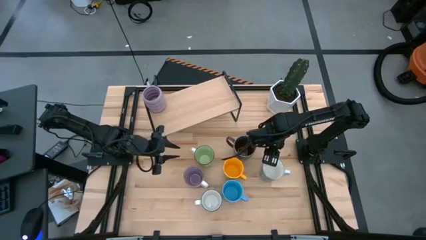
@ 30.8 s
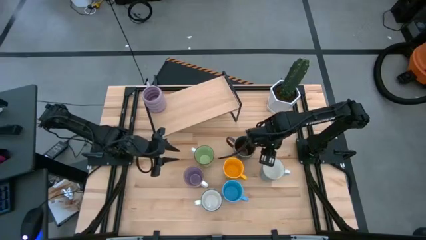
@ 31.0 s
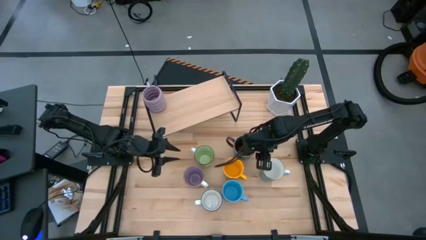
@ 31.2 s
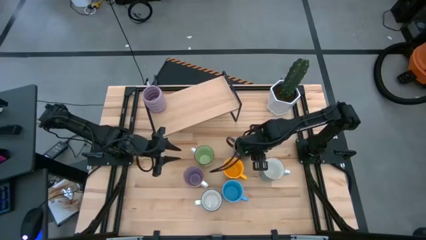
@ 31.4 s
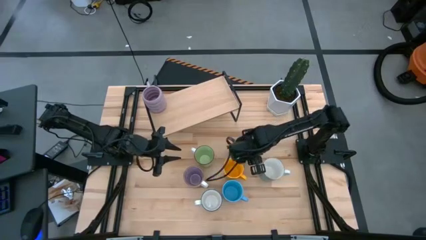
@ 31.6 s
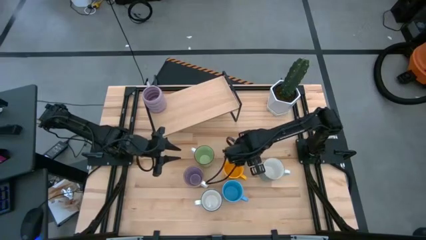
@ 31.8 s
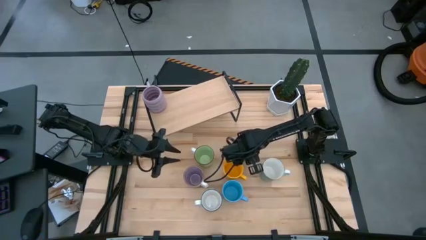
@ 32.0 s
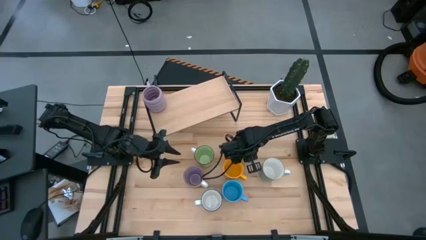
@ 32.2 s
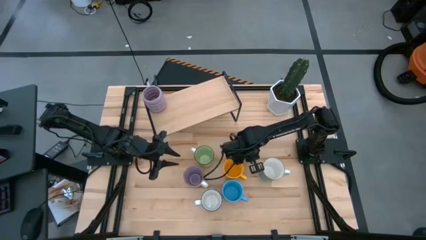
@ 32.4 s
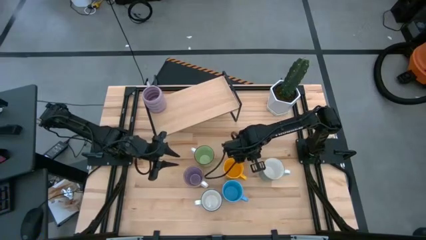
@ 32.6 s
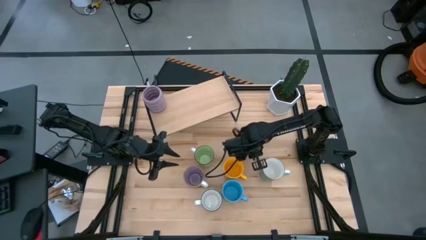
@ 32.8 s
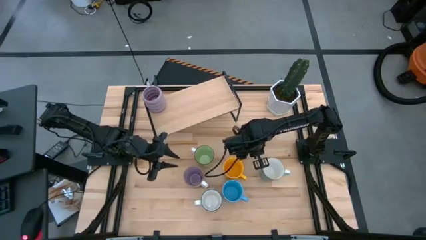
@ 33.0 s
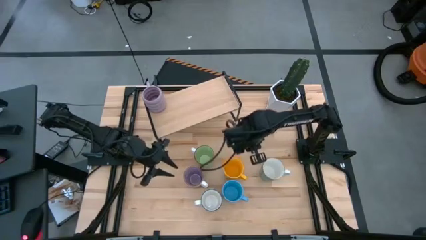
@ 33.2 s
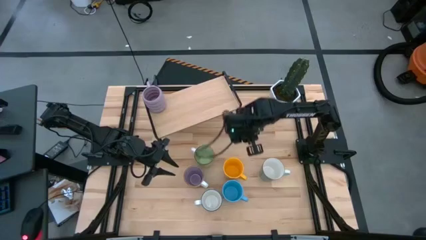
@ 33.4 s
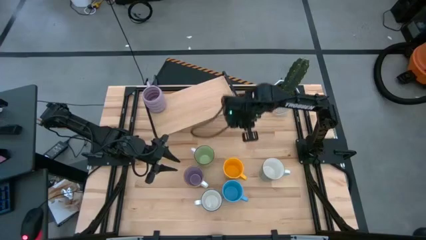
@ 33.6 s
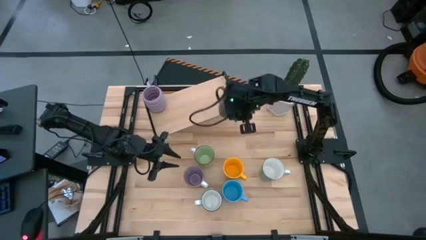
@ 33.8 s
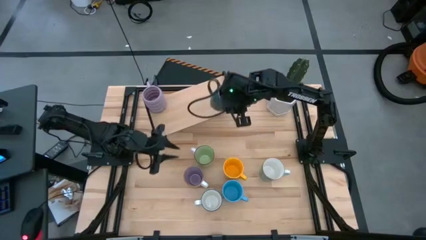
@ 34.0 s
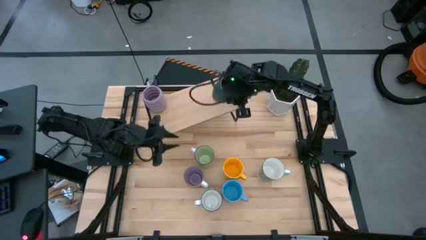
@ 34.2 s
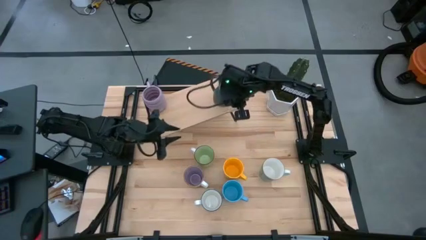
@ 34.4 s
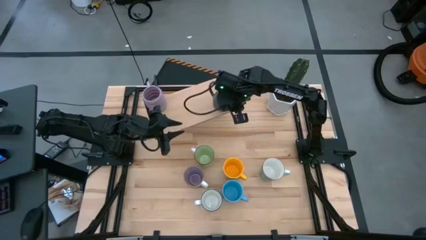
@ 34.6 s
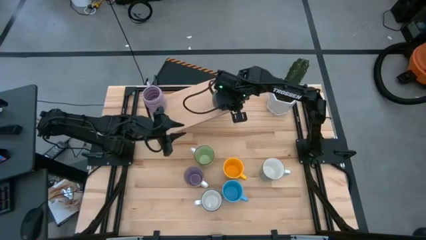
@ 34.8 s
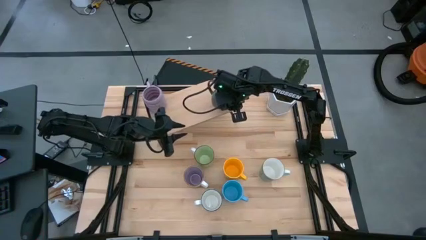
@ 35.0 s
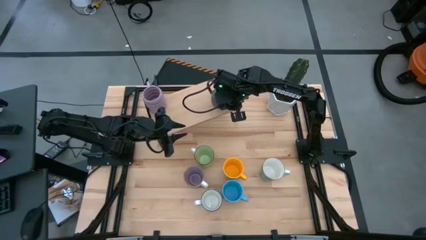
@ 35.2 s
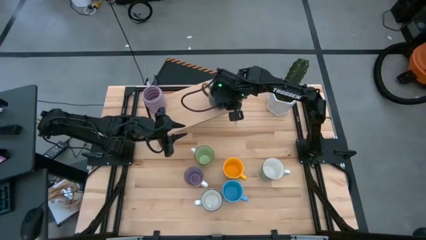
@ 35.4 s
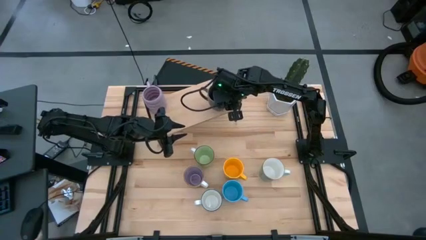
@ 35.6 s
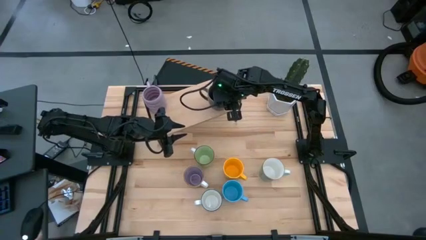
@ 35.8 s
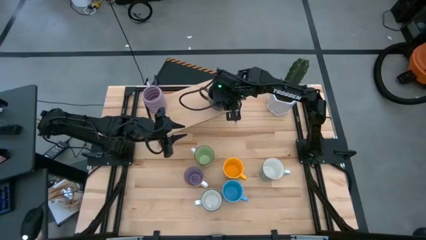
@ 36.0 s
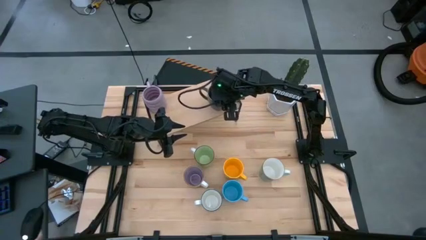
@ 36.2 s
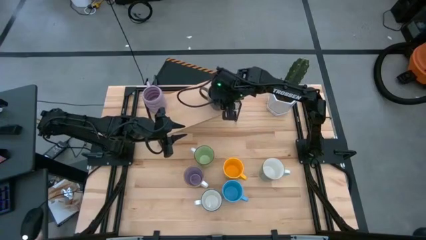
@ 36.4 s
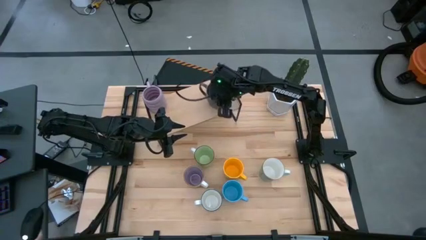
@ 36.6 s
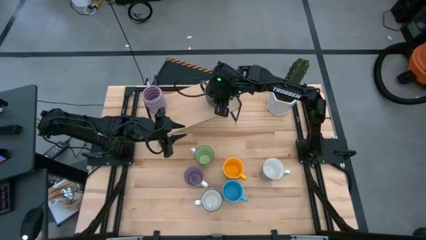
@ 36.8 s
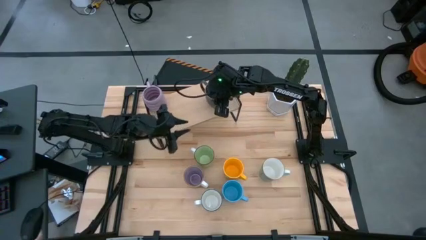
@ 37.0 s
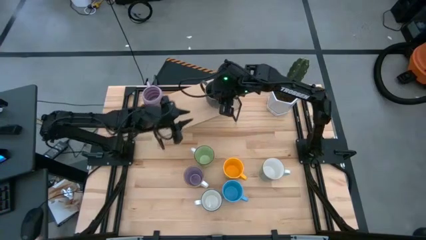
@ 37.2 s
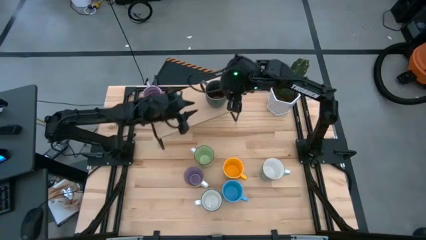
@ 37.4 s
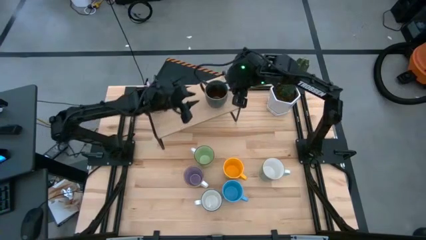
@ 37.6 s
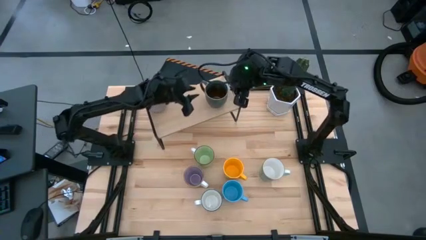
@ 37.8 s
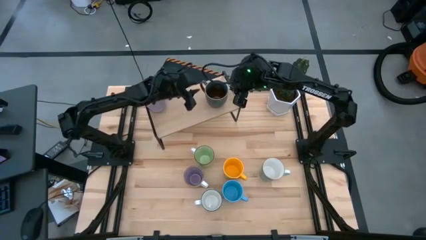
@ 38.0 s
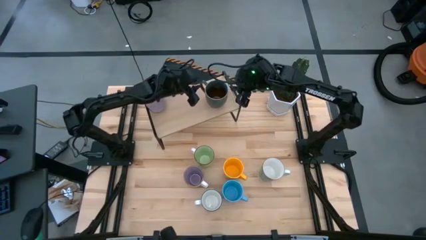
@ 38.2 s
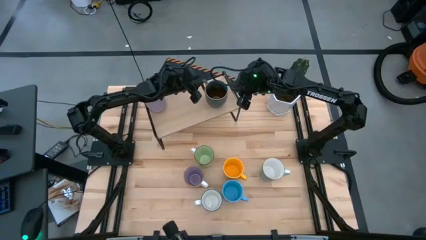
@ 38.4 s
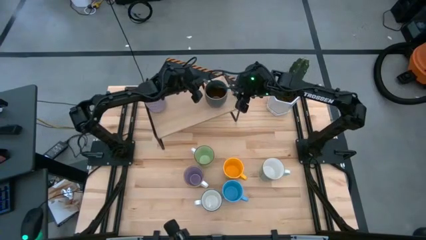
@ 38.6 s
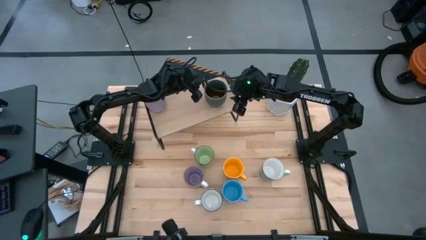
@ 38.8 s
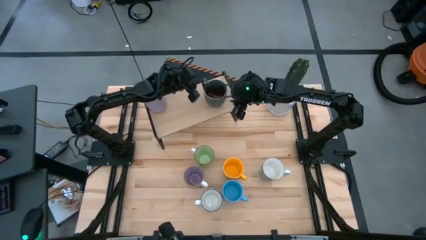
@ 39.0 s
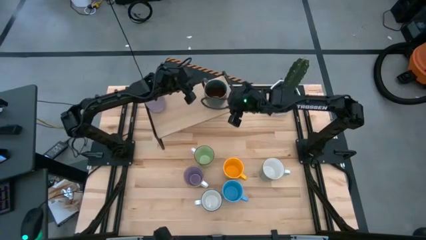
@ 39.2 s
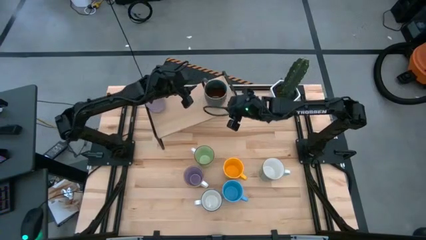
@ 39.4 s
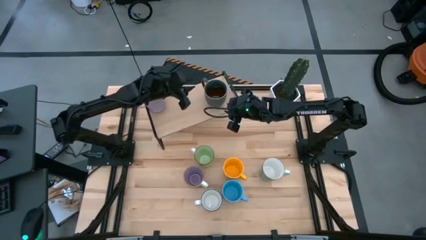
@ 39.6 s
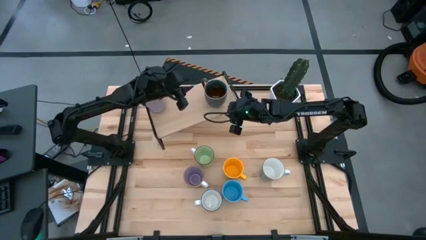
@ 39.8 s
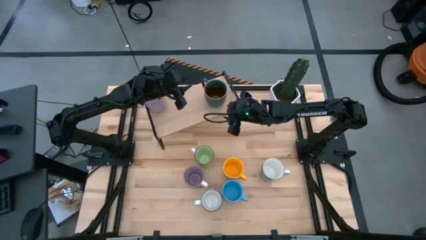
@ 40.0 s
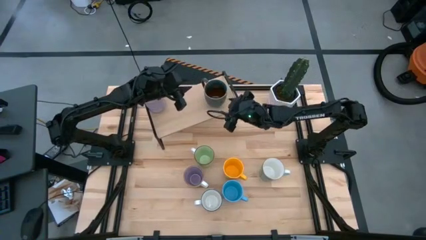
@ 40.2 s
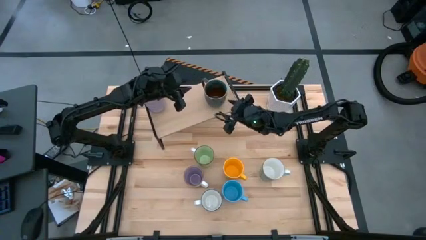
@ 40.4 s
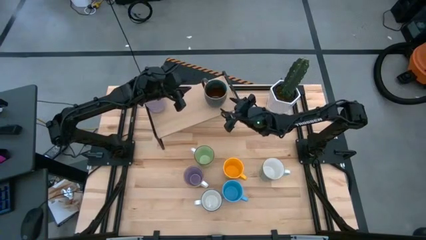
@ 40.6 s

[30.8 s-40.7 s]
Task: Place coffee mugs
Put the green-brown patterned mug on the shelf

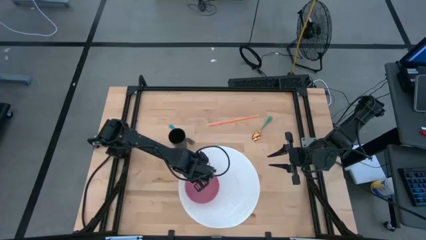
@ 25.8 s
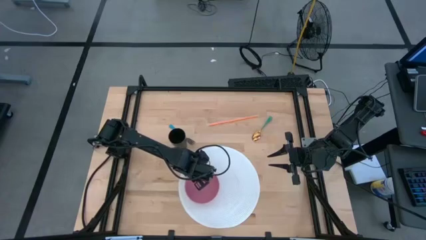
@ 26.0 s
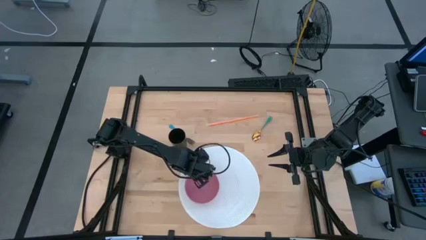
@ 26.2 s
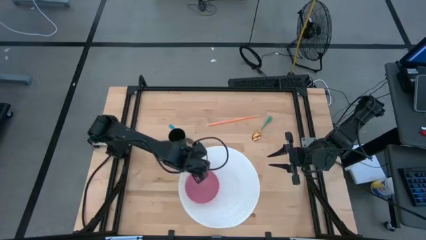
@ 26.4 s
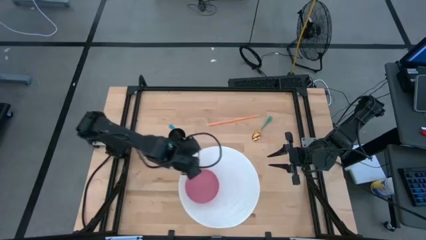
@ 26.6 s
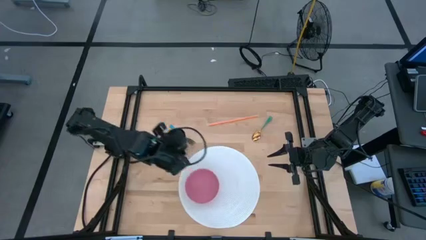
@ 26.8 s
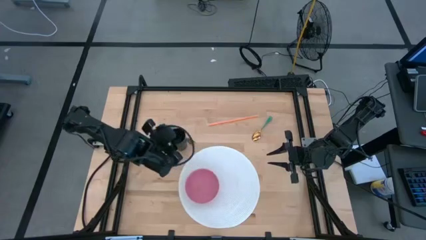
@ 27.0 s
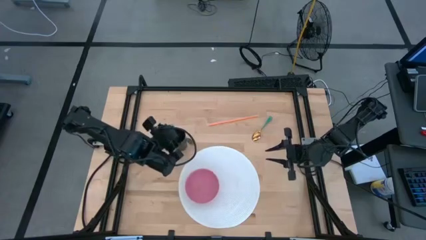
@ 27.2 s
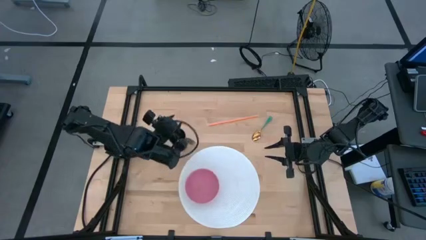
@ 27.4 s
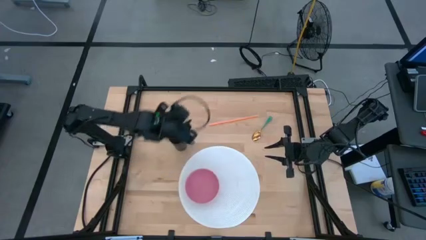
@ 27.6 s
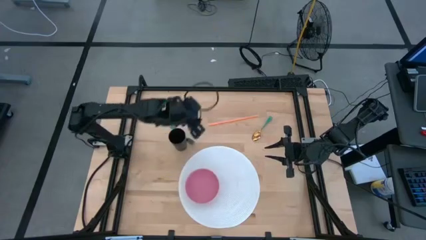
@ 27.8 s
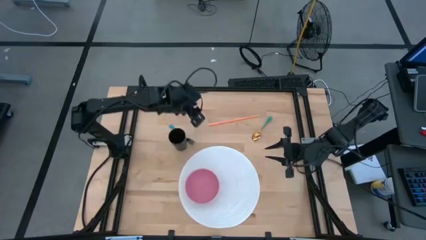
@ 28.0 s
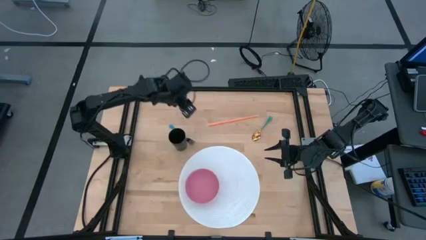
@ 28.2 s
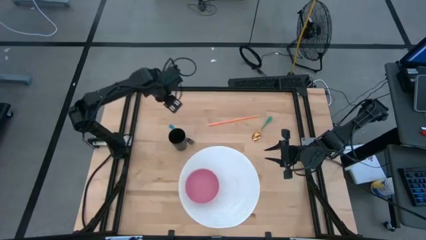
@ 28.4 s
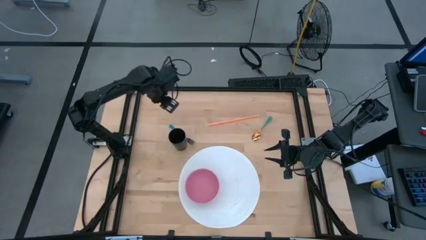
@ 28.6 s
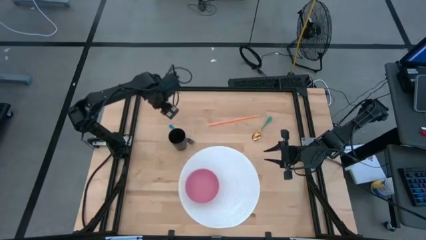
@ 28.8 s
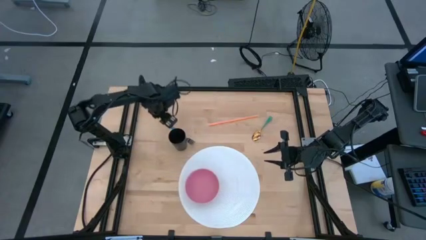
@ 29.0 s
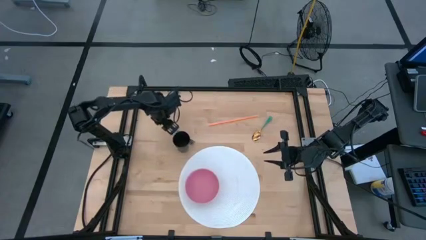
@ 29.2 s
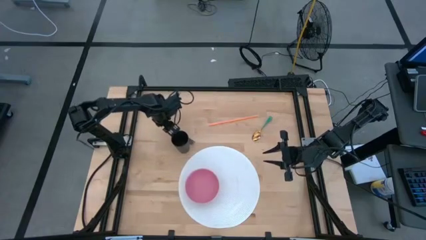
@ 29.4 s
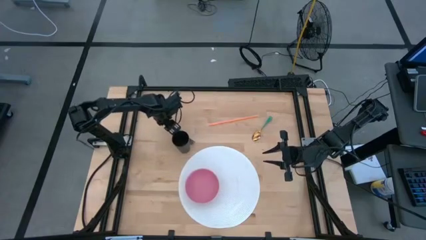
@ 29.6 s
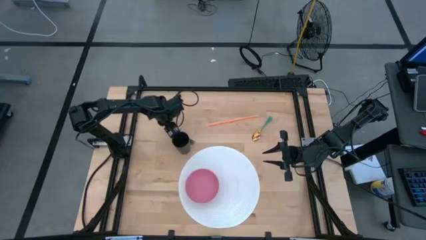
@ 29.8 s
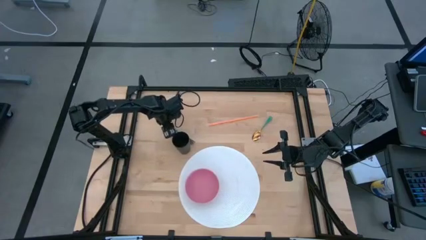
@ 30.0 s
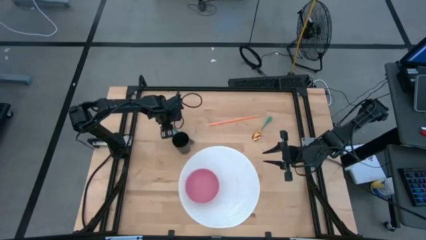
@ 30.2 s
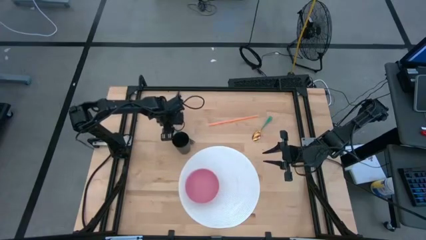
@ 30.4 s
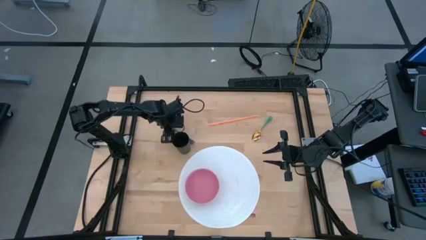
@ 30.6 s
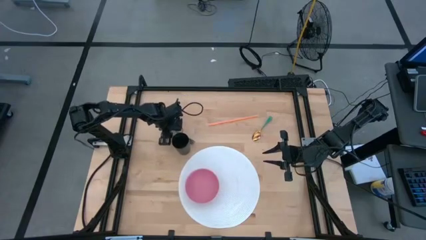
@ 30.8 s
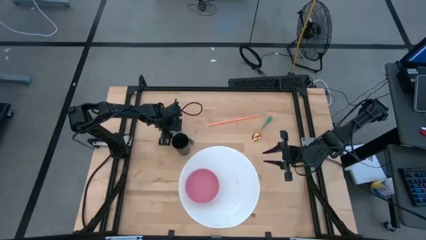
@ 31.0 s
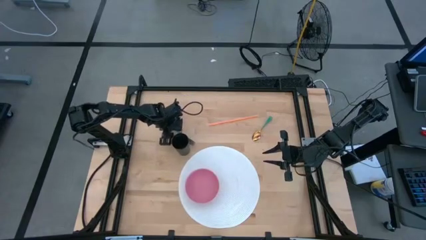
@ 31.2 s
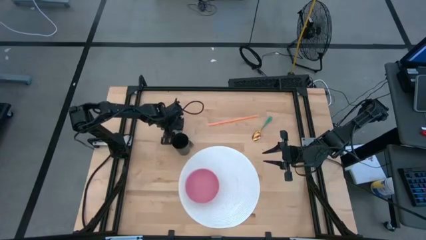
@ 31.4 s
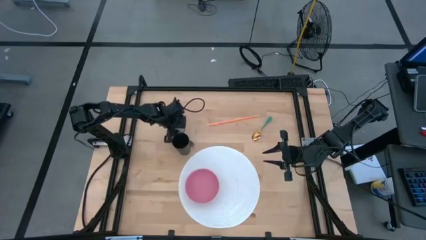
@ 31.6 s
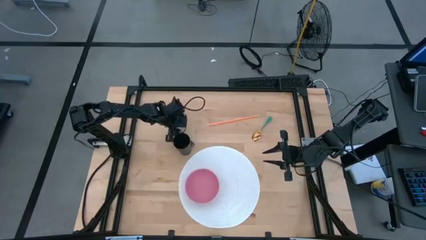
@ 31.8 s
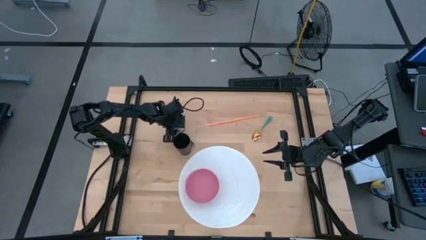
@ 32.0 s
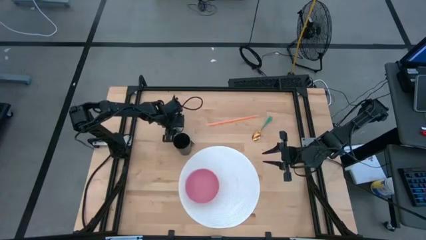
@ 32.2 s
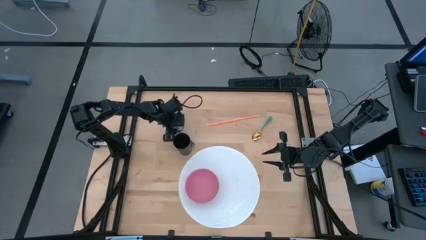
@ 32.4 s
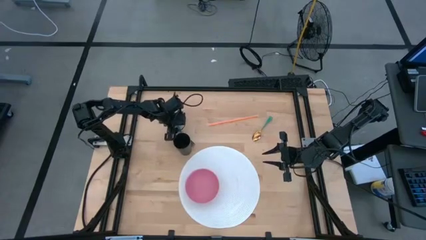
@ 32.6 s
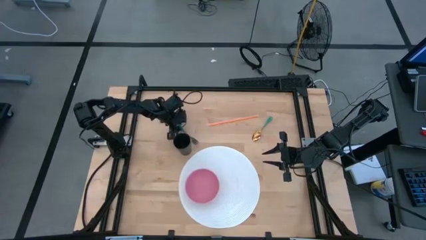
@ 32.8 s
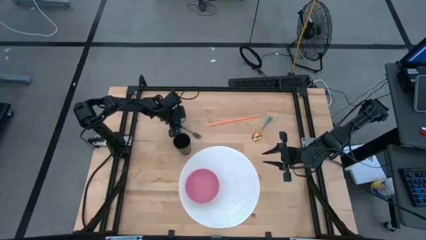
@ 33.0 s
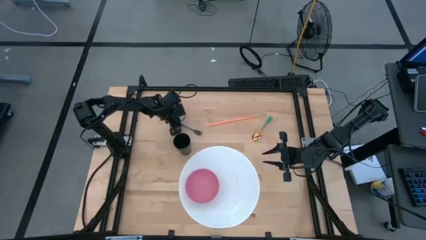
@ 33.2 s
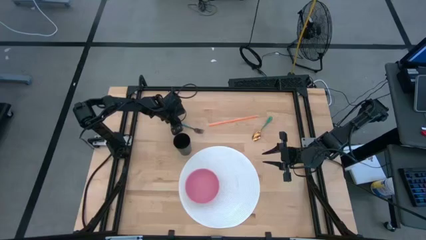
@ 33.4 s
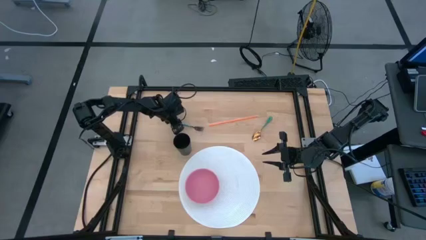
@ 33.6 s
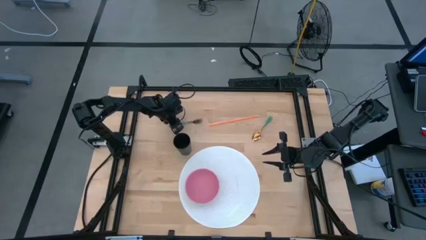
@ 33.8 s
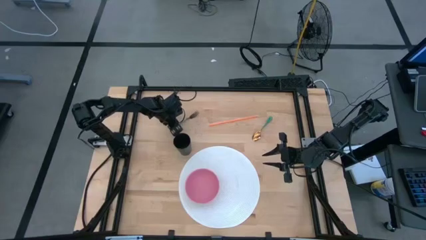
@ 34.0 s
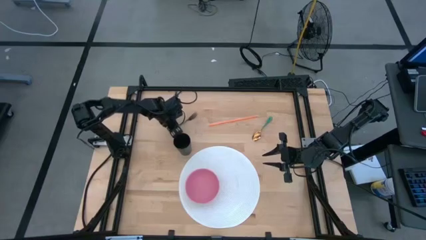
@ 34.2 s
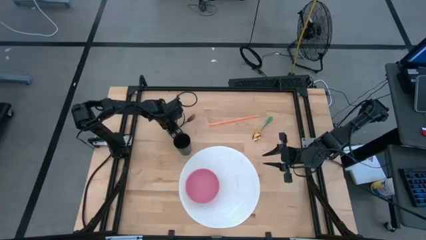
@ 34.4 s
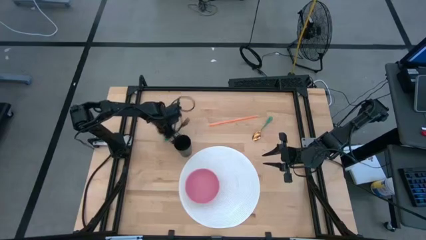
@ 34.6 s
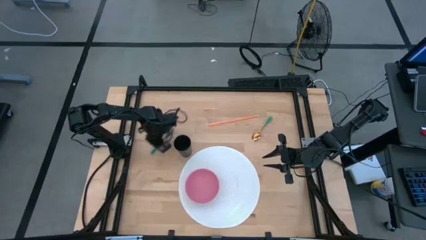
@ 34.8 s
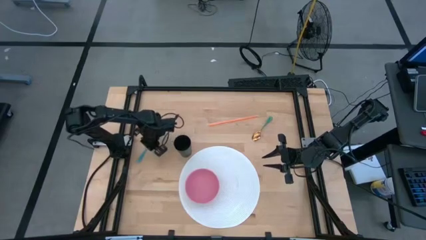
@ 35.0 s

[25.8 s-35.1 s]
Task: Pick & Place Utensil
Put the blue fork in the pink bowl
